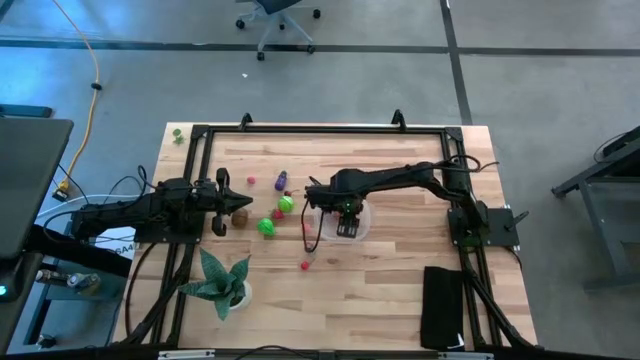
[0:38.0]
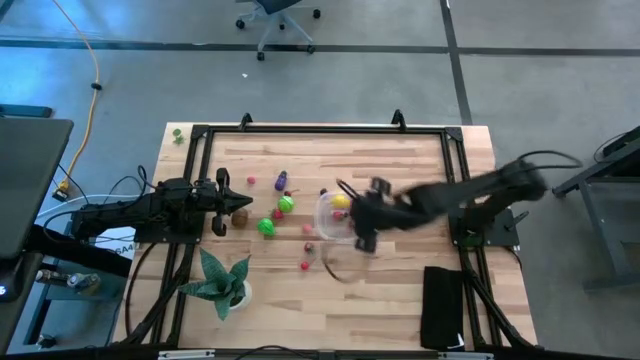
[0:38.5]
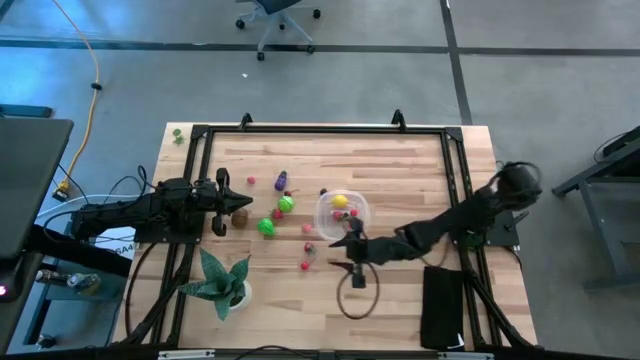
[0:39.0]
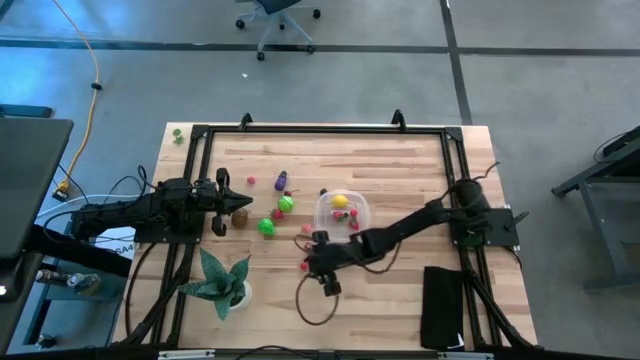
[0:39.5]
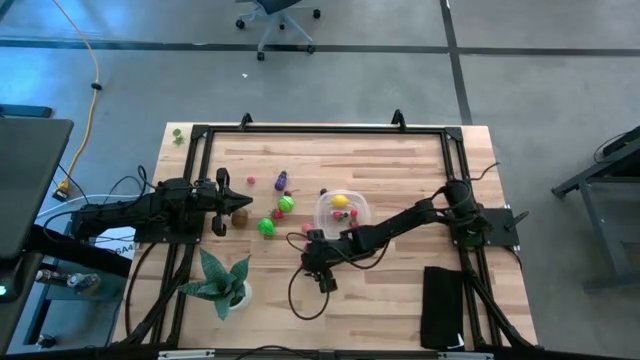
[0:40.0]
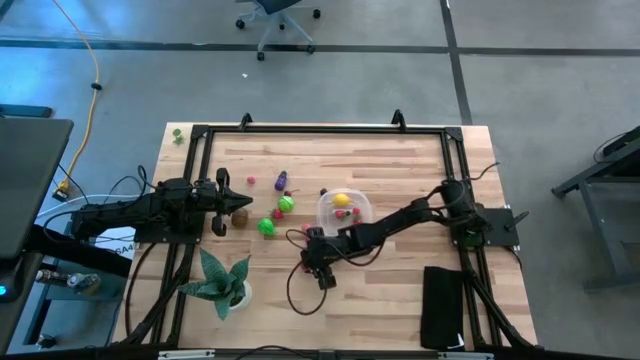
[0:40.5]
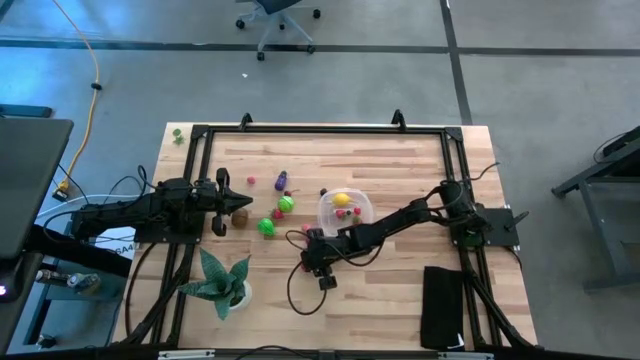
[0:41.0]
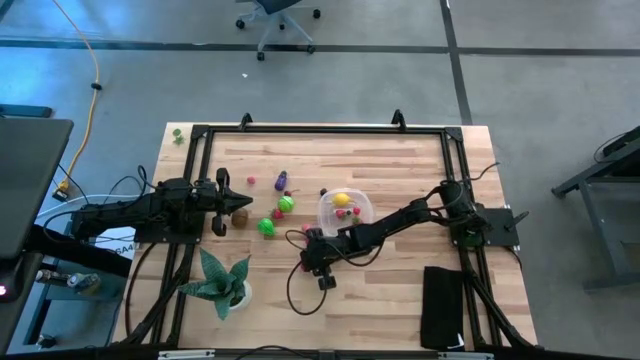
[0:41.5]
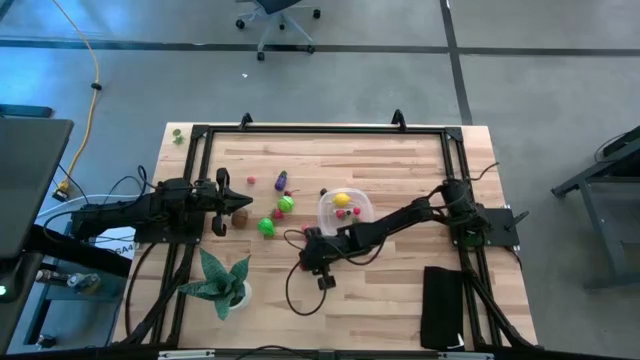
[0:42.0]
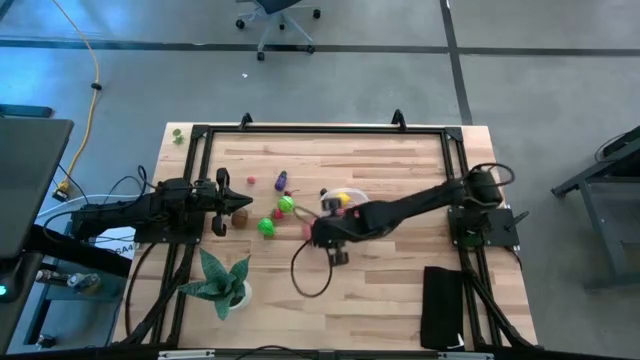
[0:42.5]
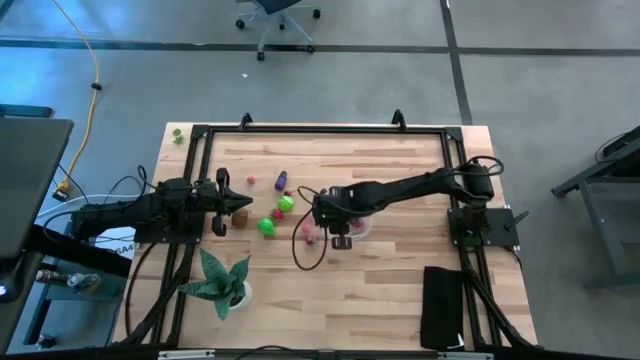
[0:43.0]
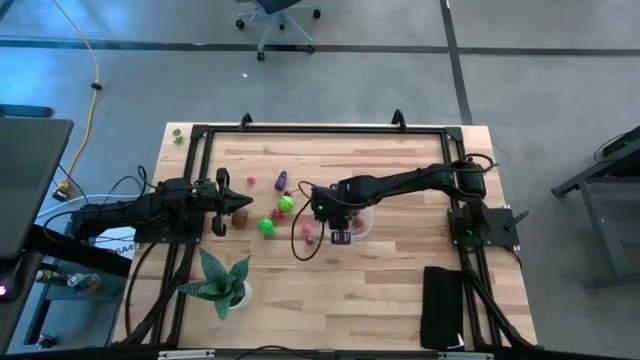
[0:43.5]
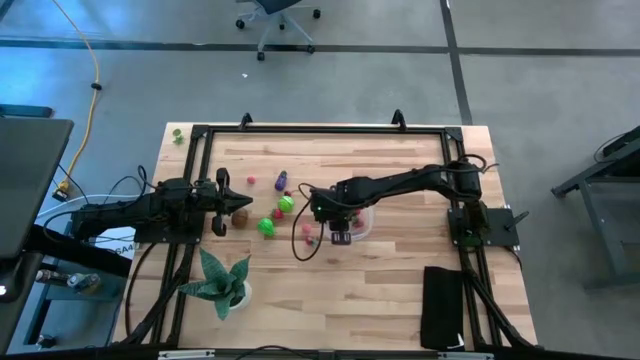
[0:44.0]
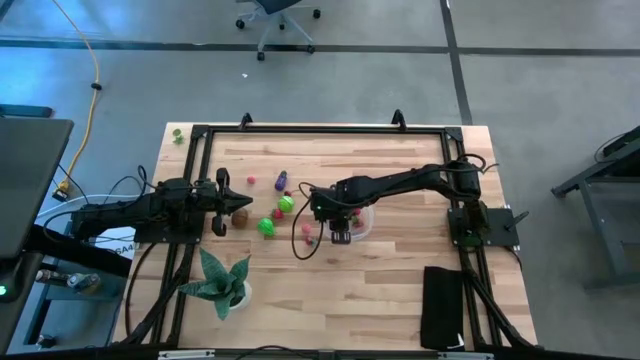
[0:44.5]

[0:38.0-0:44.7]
Task: Pick and placing Produce into tupperware
Put the red cherry into the transparent container

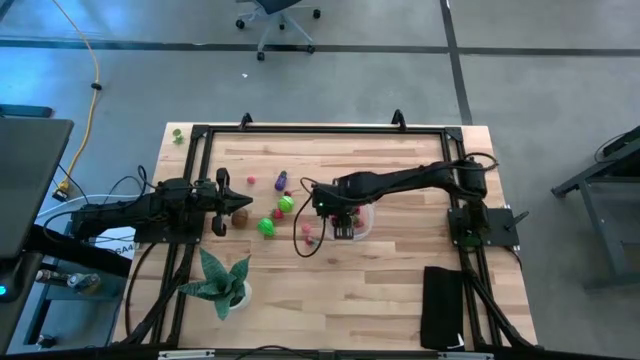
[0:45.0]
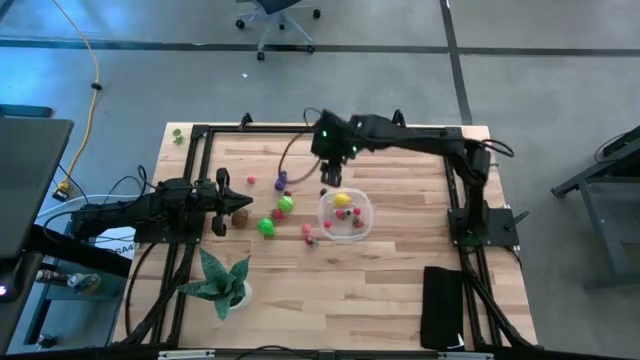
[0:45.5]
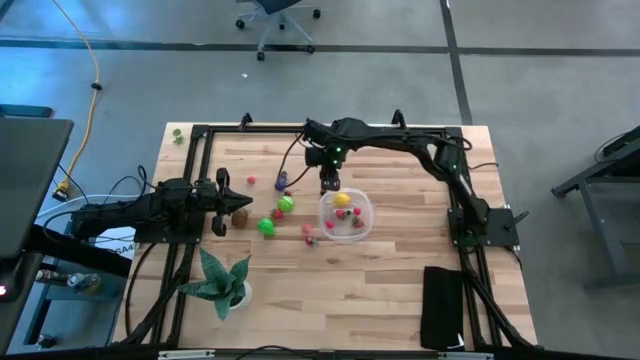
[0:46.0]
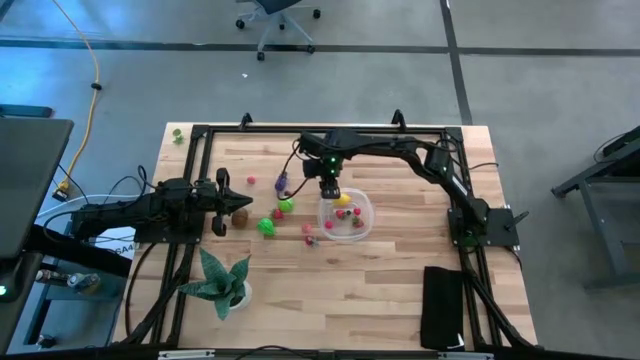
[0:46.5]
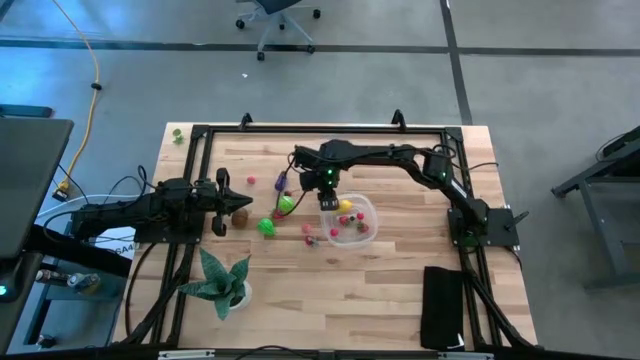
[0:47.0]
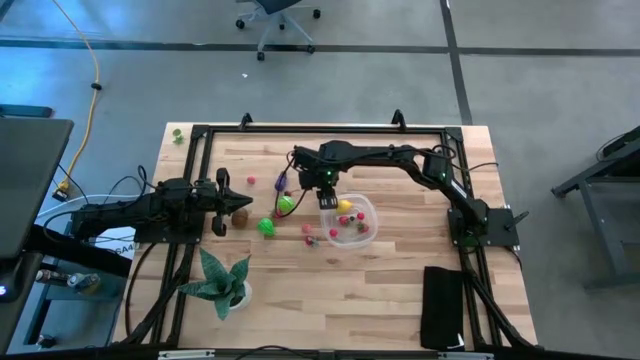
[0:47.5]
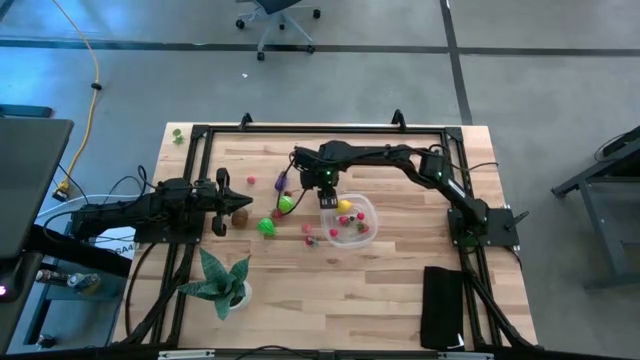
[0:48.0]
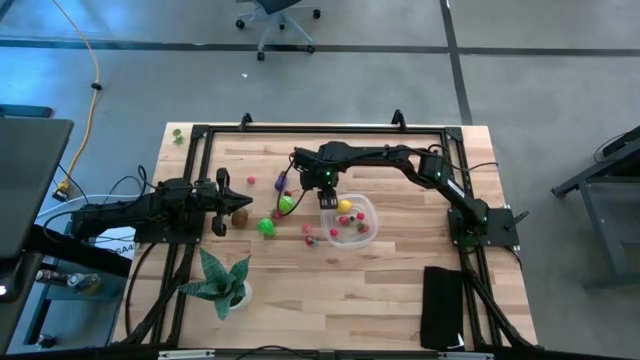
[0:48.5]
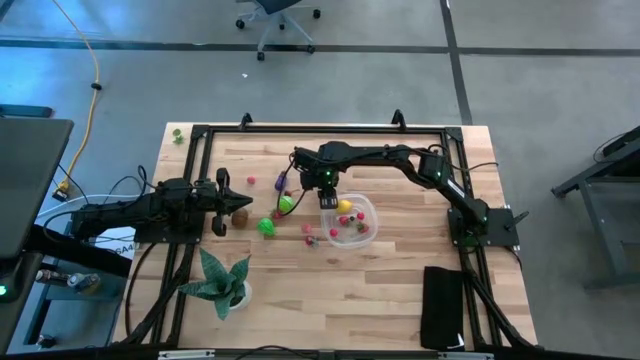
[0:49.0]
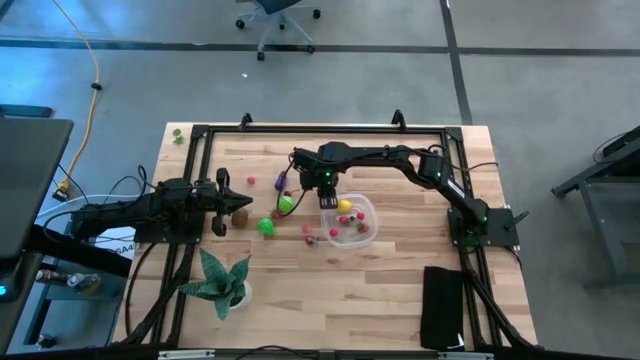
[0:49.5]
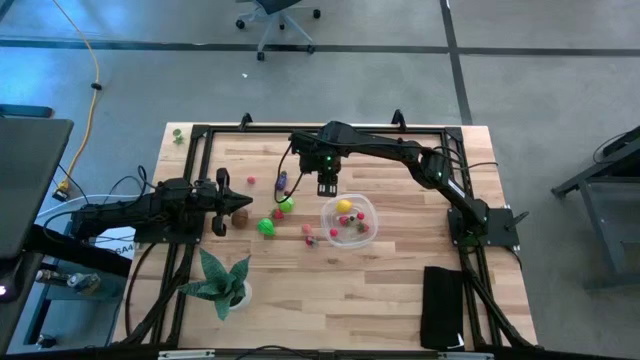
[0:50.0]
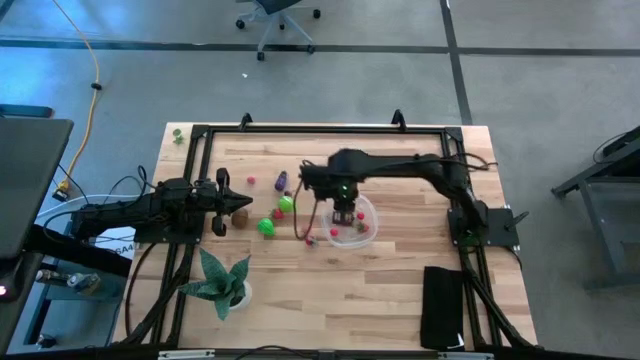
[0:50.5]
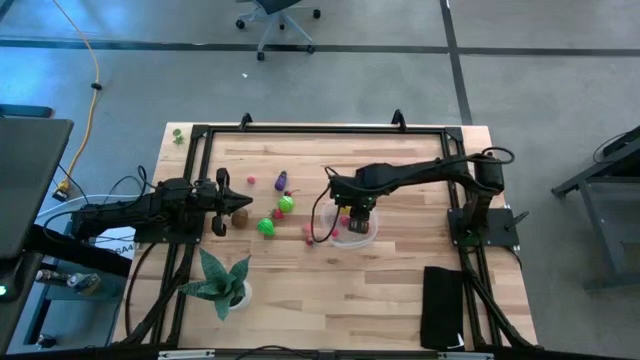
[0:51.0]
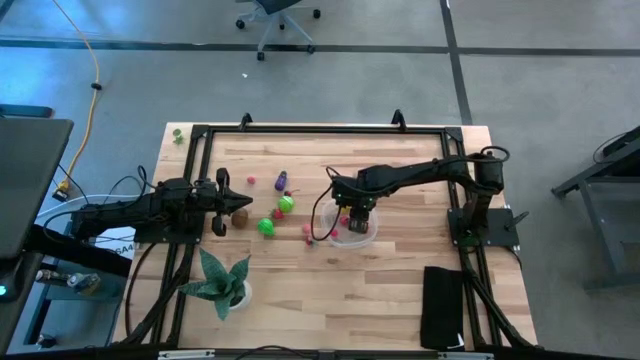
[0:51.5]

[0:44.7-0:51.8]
Put the blackberry into the transparent container

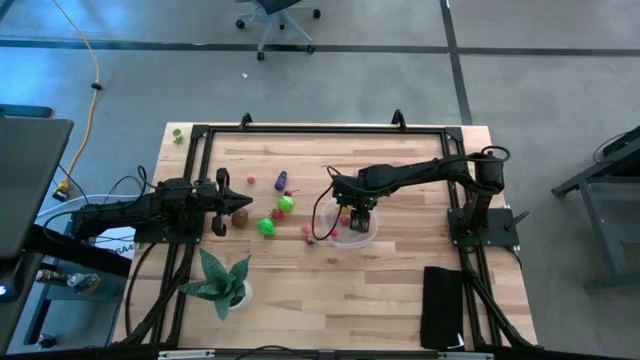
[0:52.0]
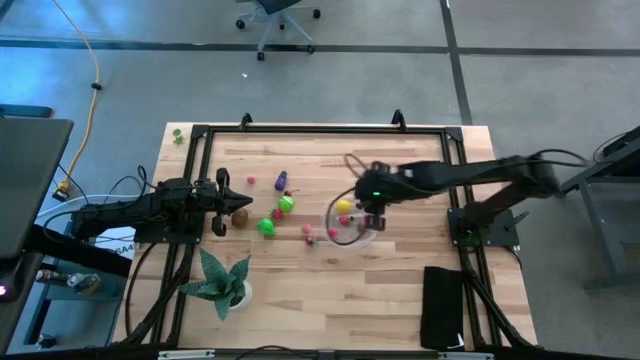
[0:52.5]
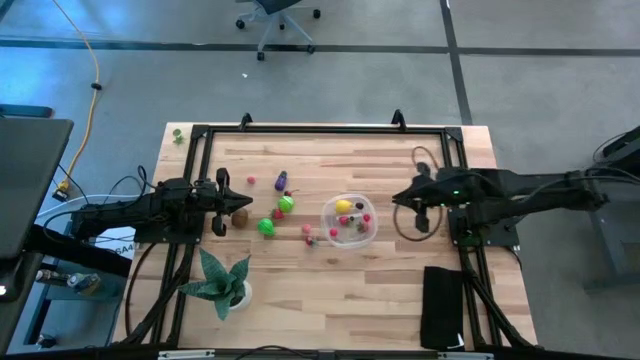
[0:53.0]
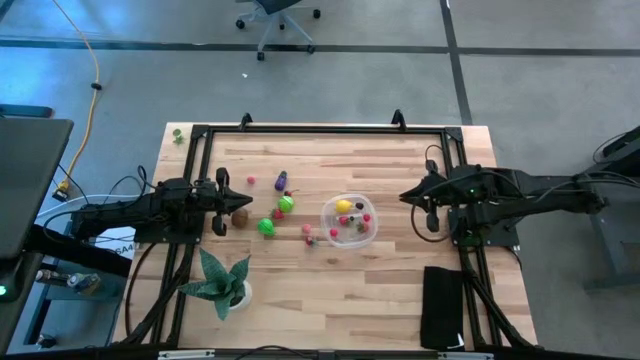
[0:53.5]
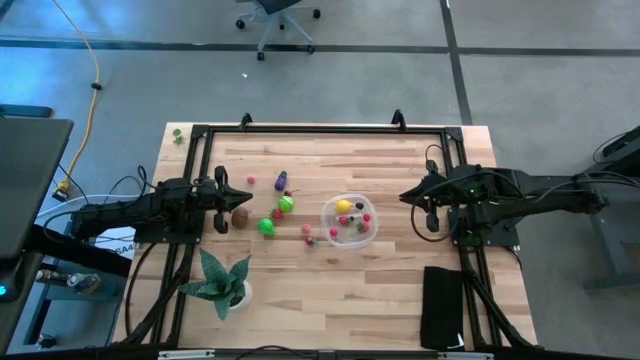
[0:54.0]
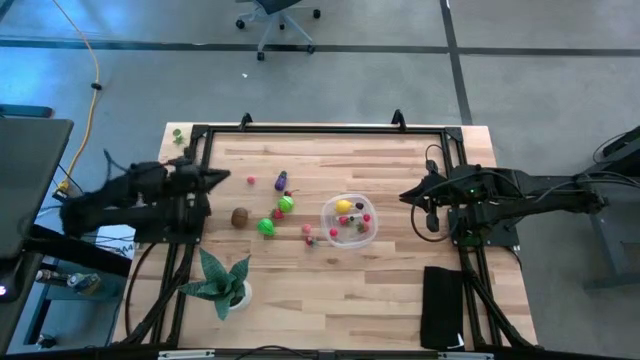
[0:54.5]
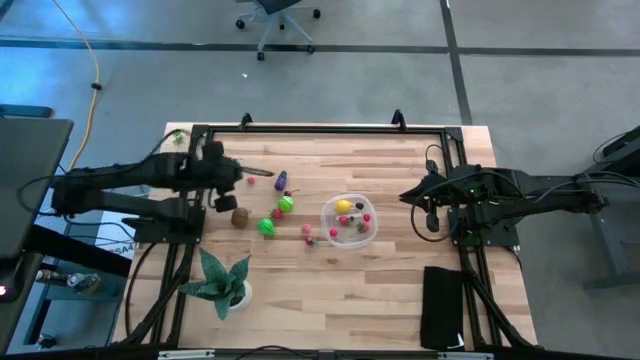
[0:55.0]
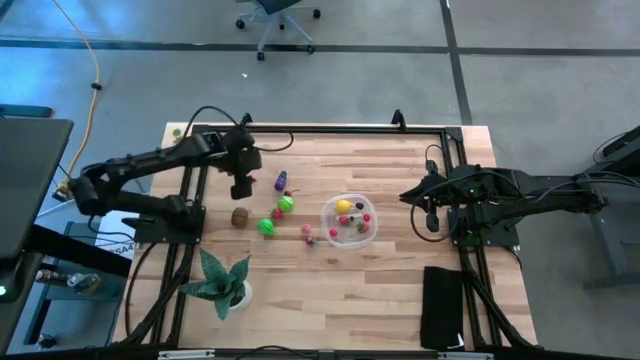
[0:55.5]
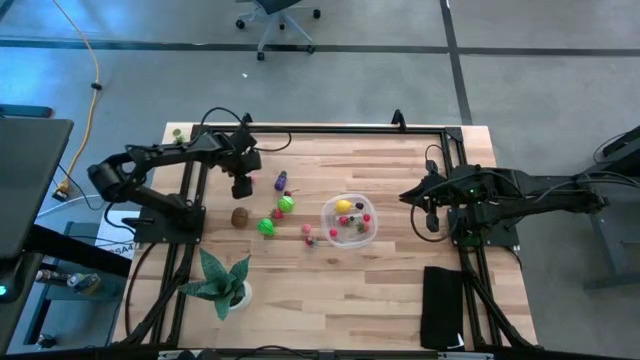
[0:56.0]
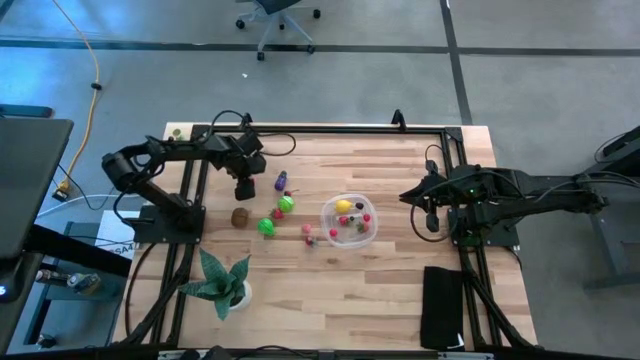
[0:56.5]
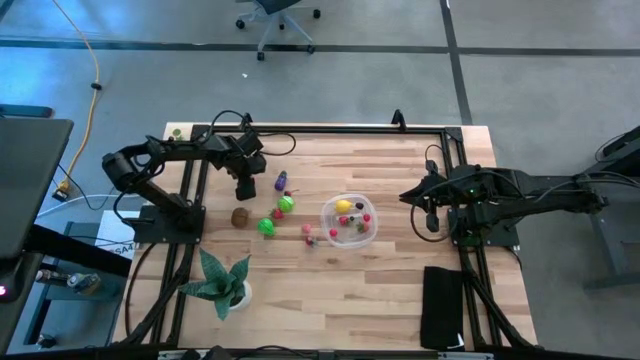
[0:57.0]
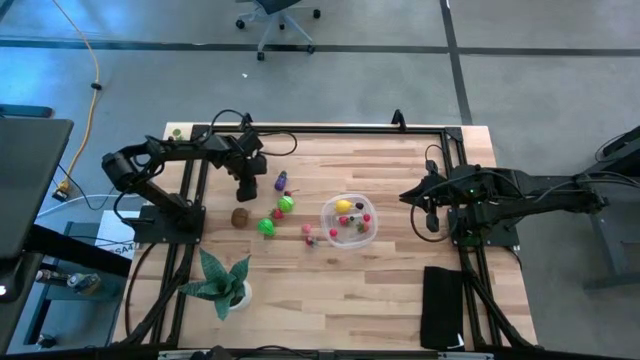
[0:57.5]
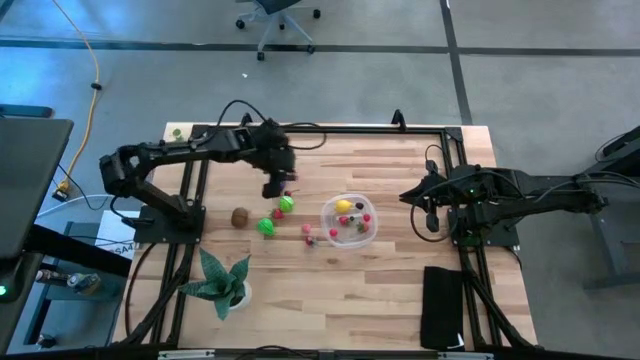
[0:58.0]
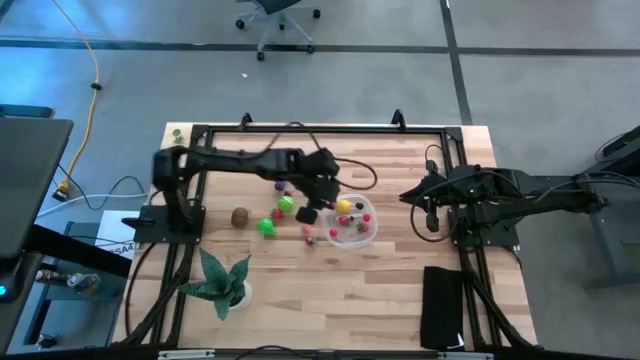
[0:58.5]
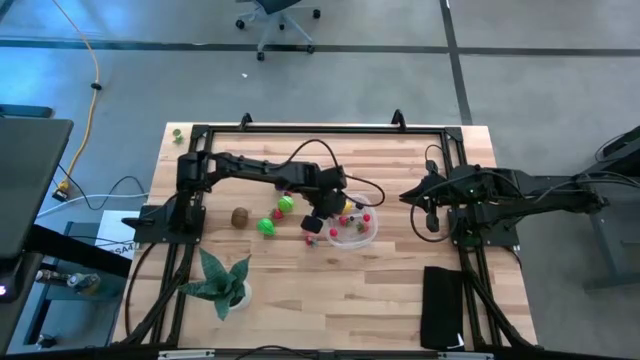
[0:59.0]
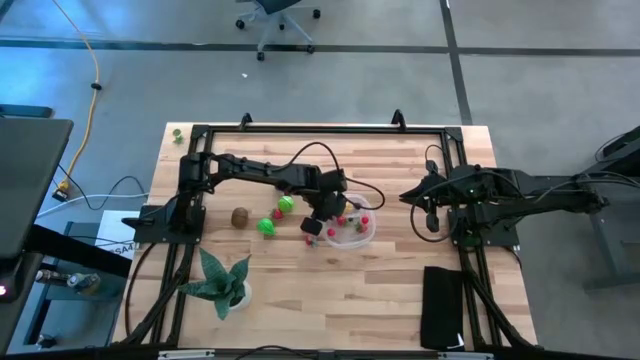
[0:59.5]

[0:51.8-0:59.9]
Put the pink peach into the transparent container
